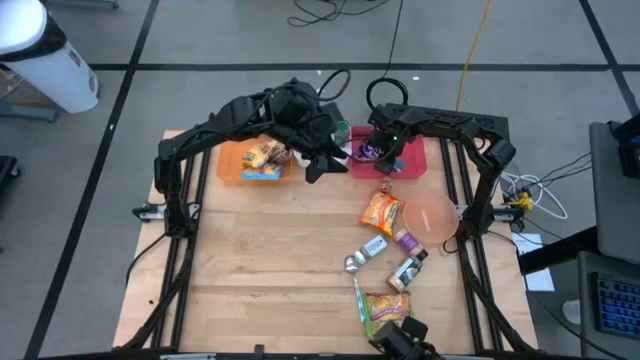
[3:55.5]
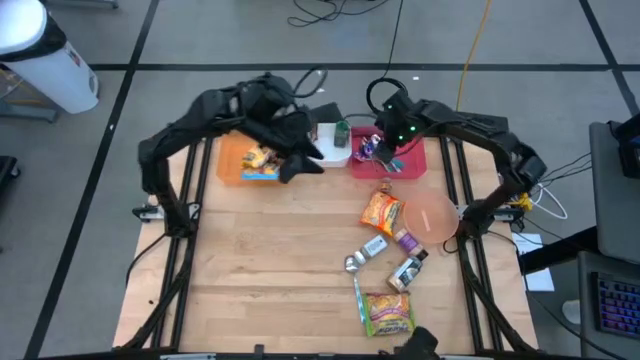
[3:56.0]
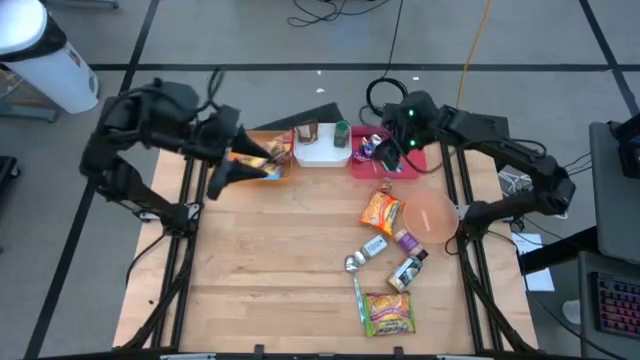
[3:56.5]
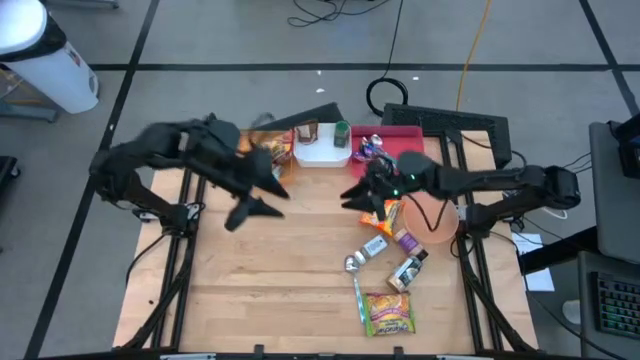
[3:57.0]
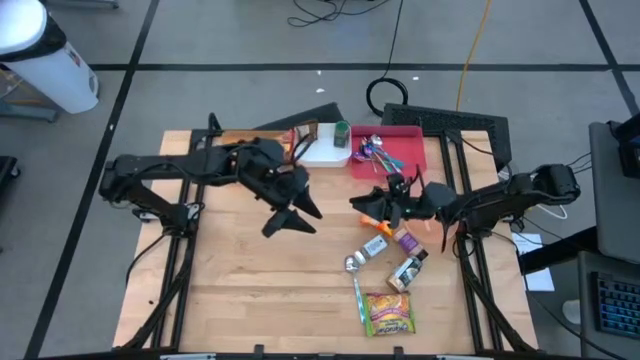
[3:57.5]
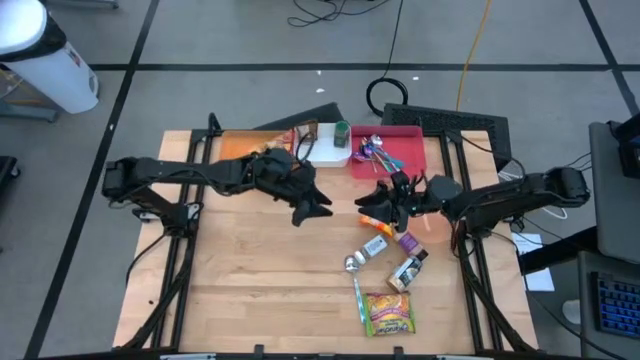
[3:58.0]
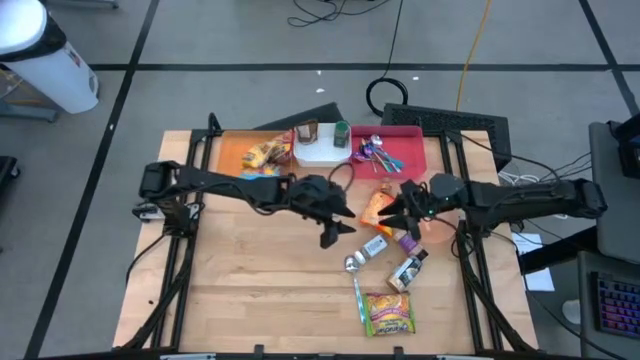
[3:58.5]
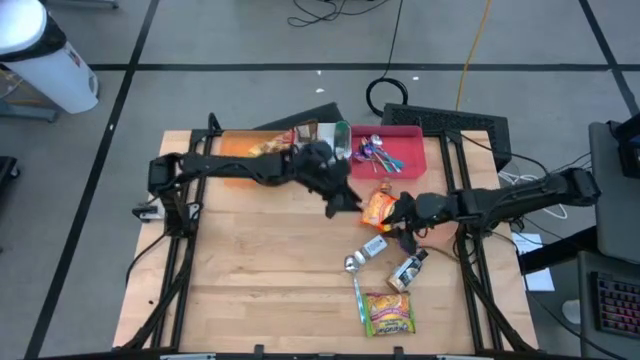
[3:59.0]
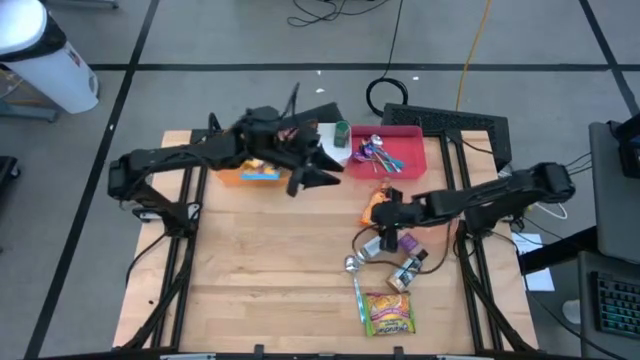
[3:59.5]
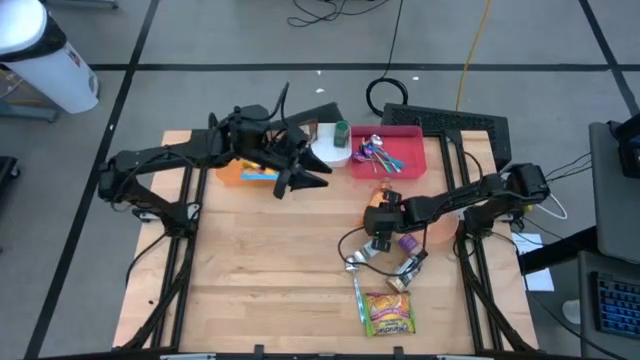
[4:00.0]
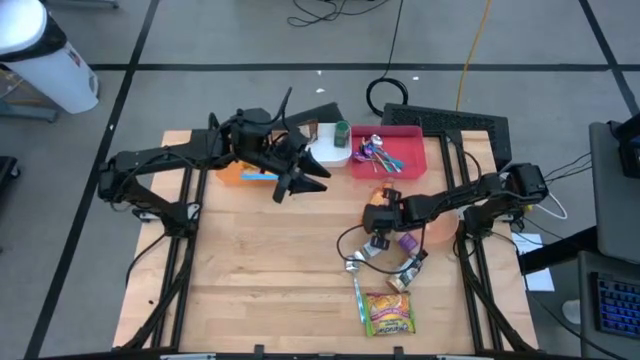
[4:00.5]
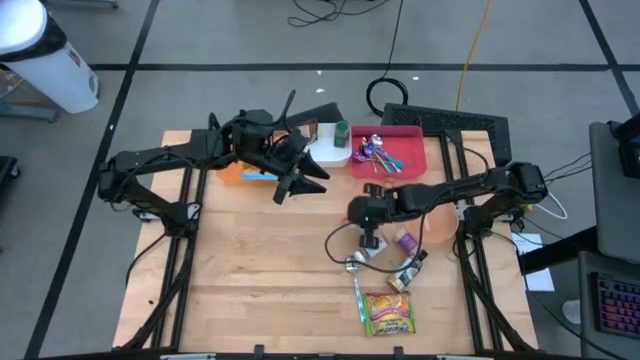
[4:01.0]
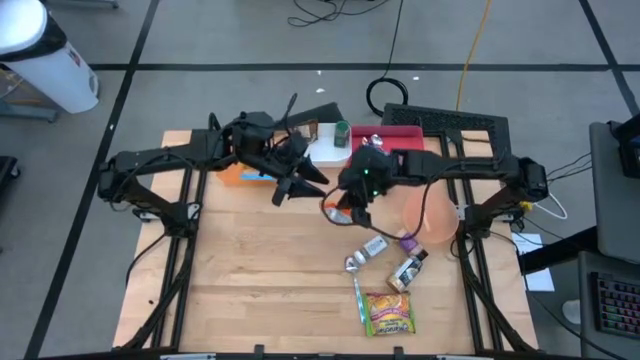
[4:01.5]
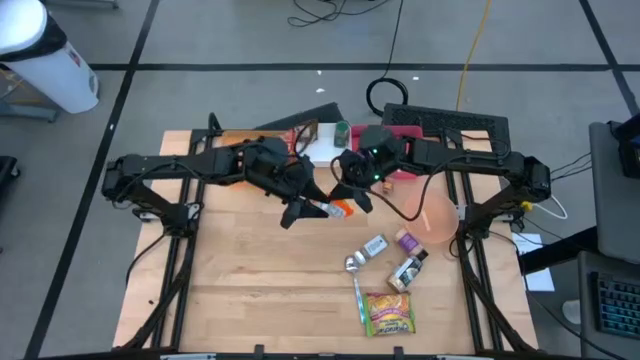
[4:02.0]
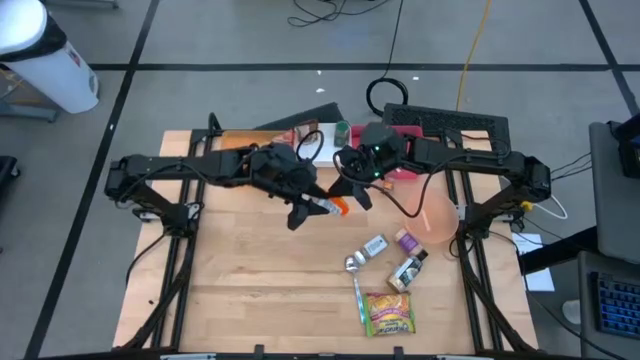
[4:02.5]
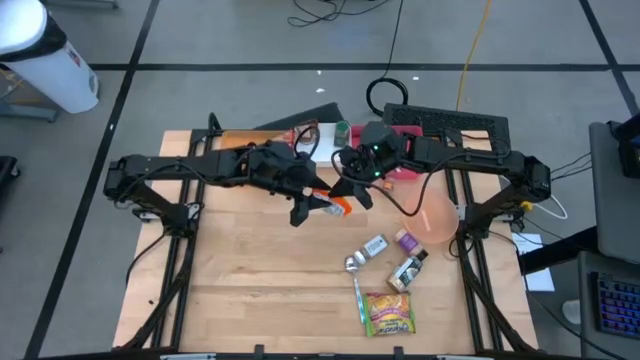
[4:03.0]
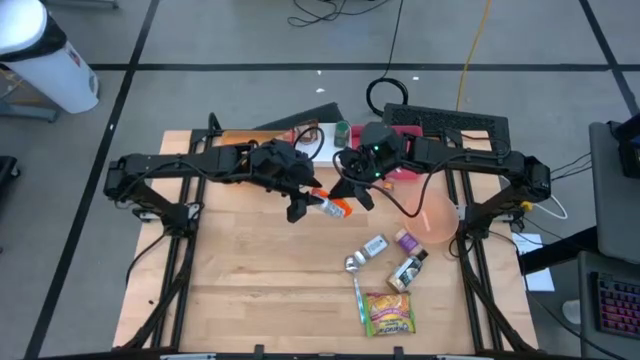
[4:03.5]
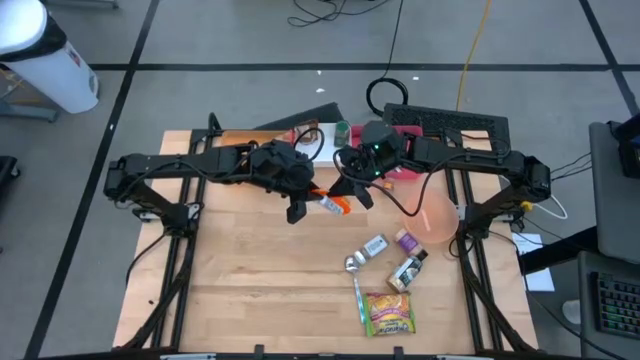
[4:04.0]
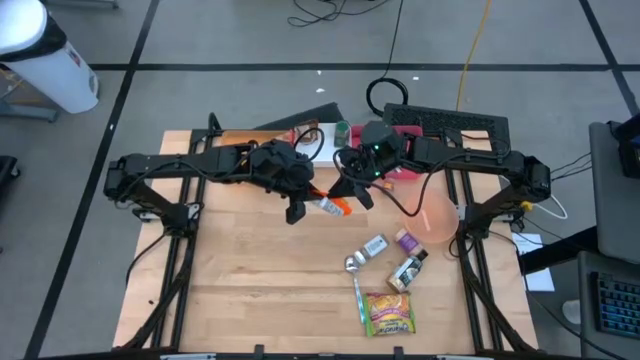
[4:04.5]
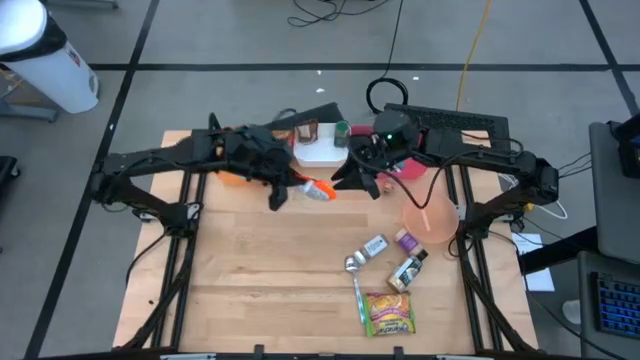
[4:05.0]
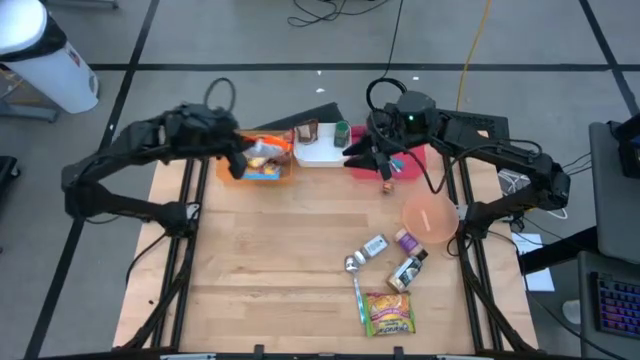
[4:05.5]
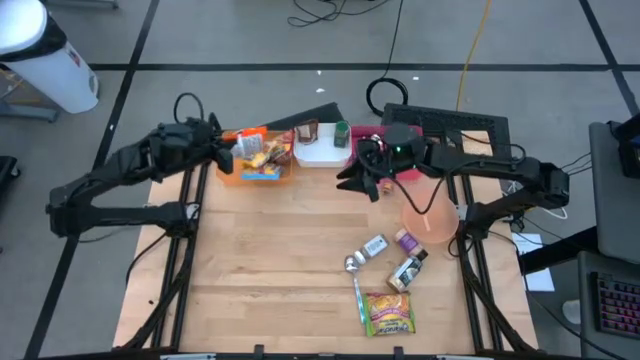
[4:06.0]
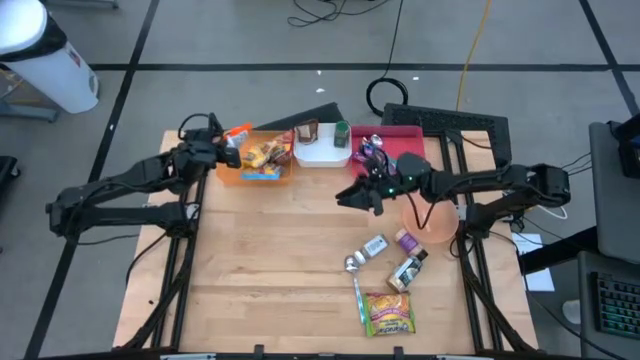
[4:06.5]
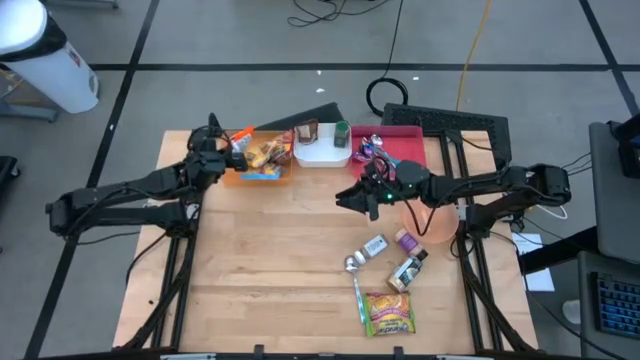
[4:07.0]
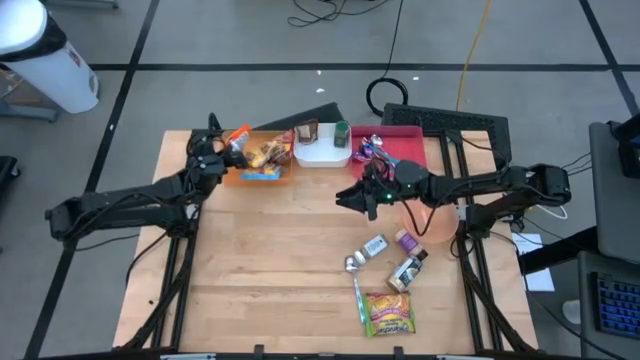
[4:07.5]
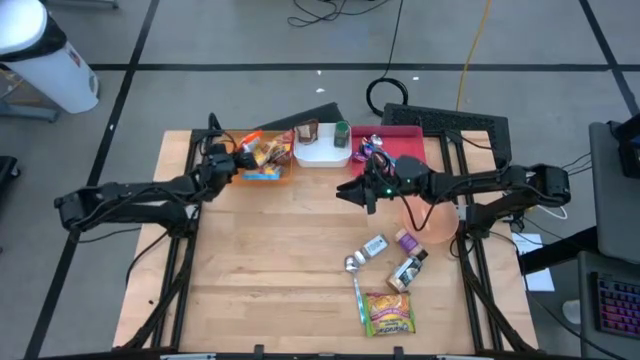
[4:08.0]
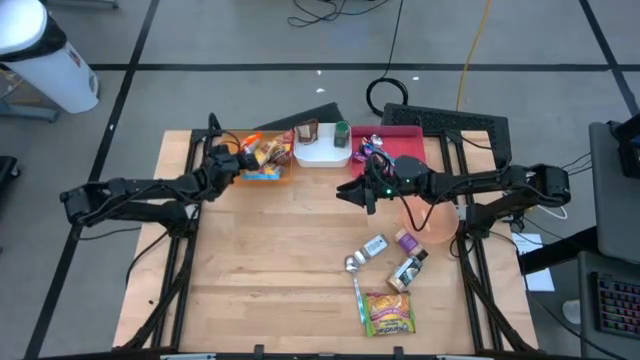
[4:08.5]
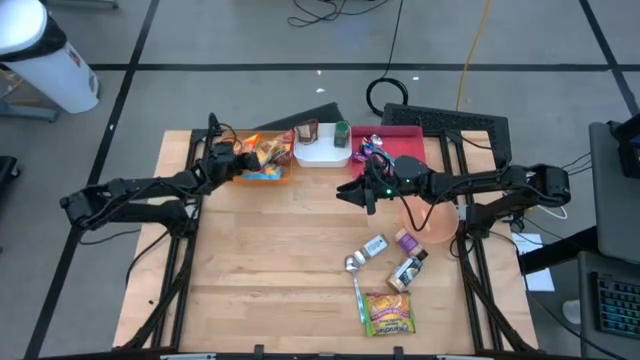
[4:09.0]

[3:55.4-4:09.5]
Task: Pick & Place Food Item
Put the orange noodle pack into the orange bin
